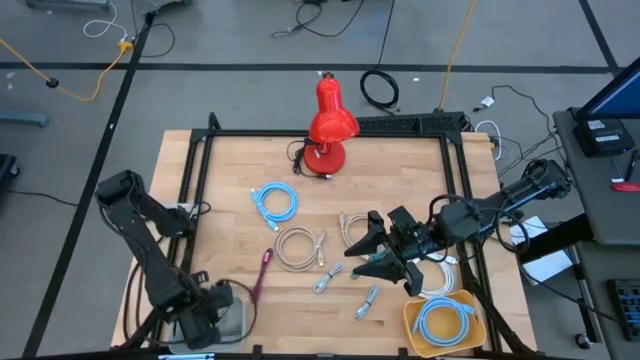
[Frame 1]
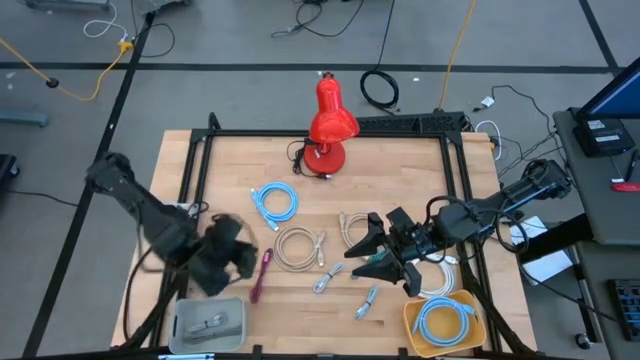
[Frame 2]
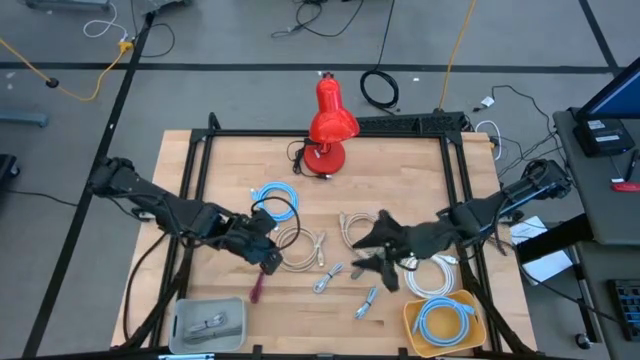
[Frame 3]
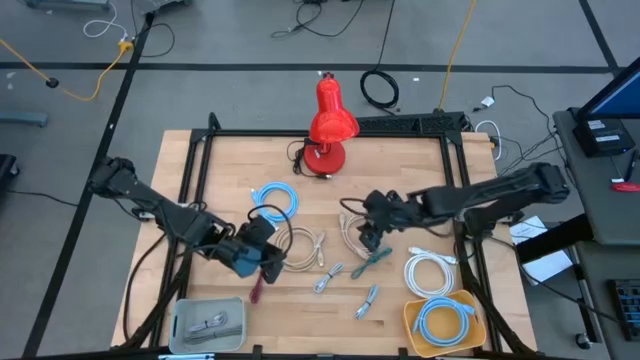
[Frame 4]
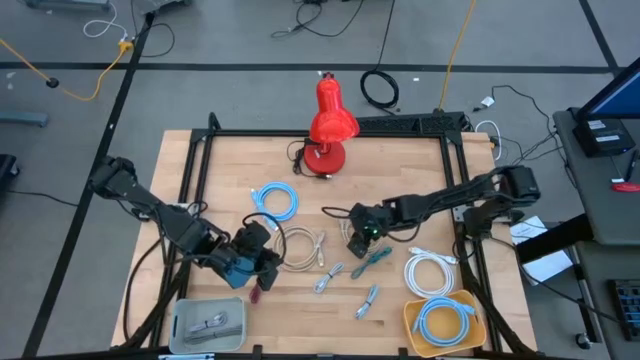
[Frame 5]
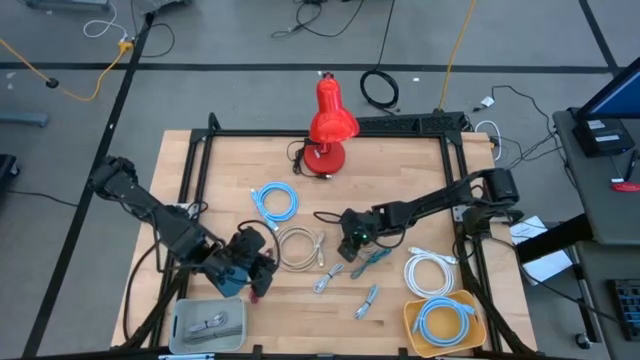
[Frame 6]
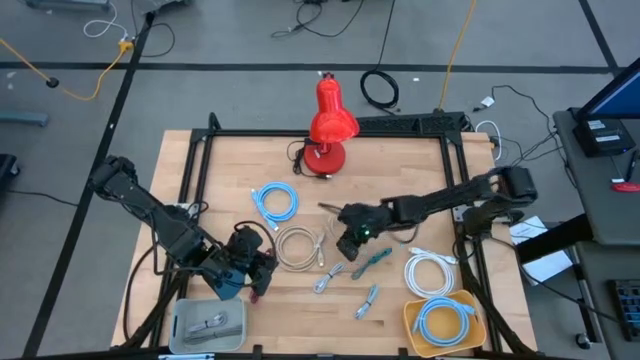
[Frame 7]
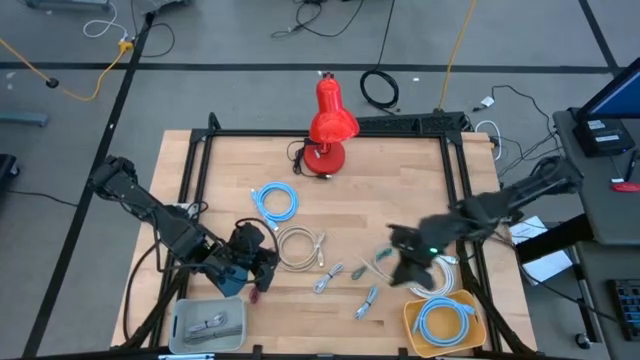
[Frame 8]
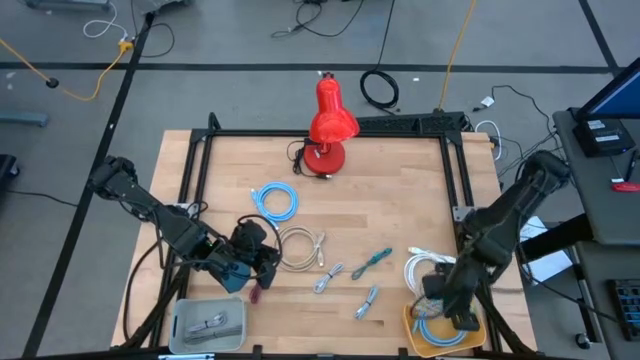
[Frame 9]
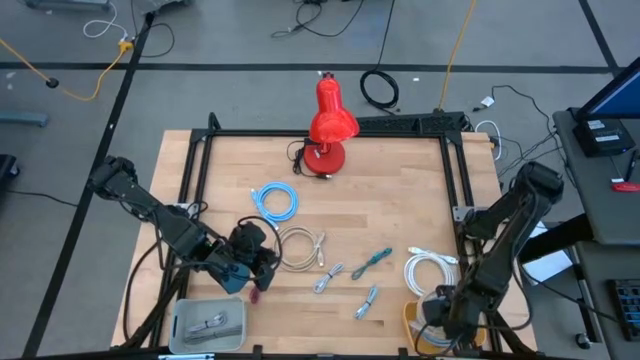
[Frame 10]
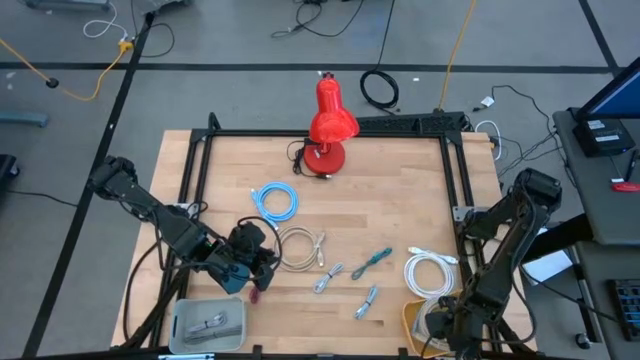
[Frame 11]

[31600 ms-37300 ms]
Task: Pick & Place USB Port
Put the right light brown HDMI cable into the yellow bin

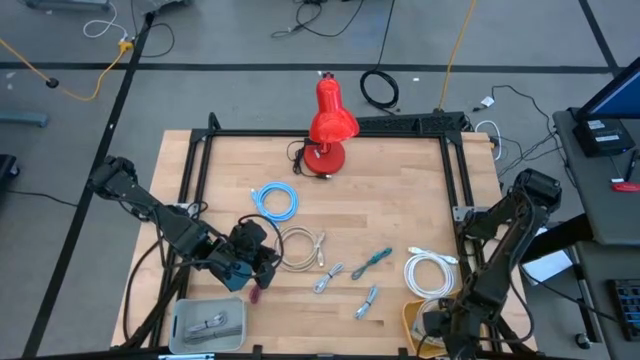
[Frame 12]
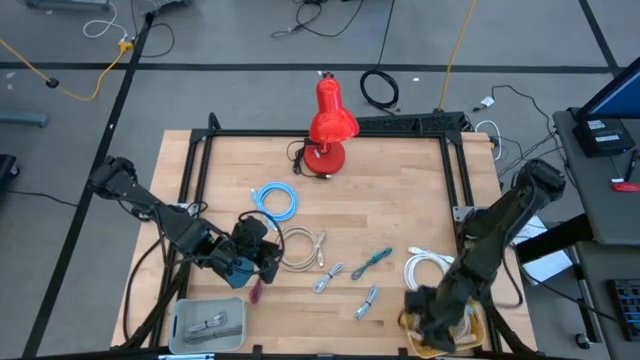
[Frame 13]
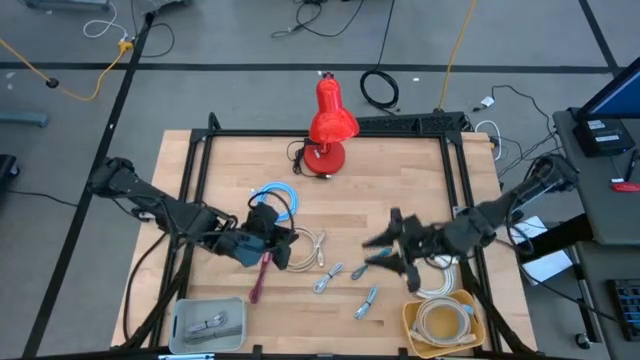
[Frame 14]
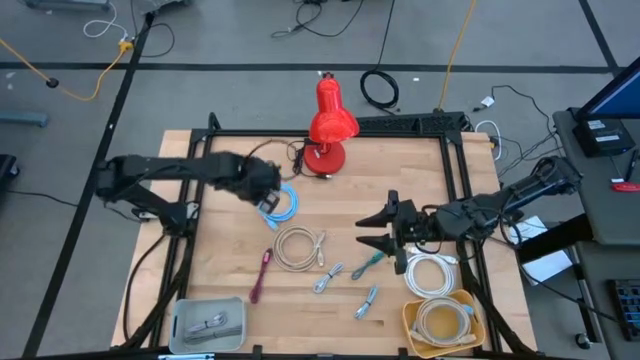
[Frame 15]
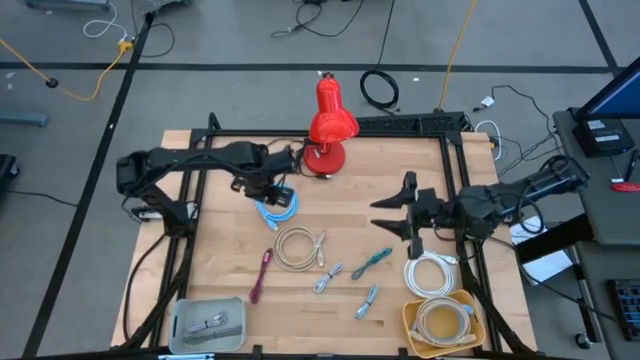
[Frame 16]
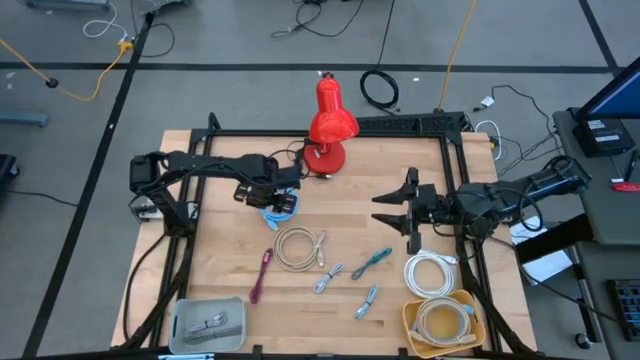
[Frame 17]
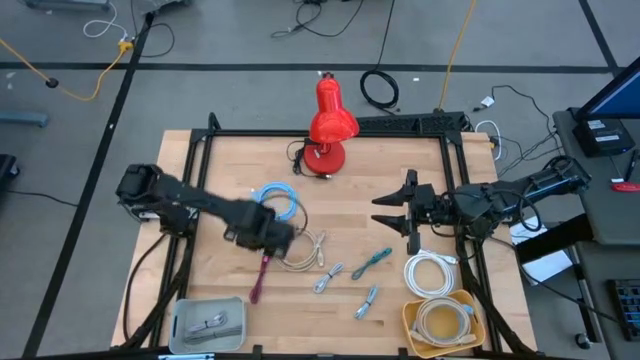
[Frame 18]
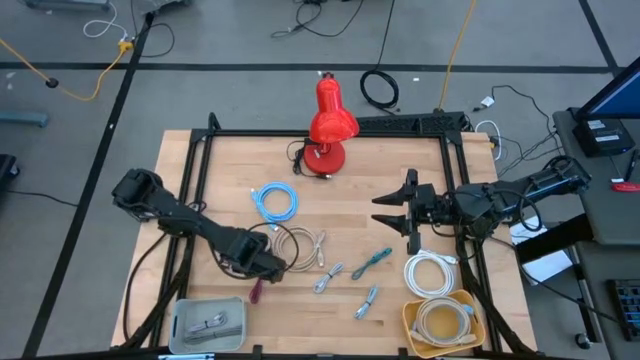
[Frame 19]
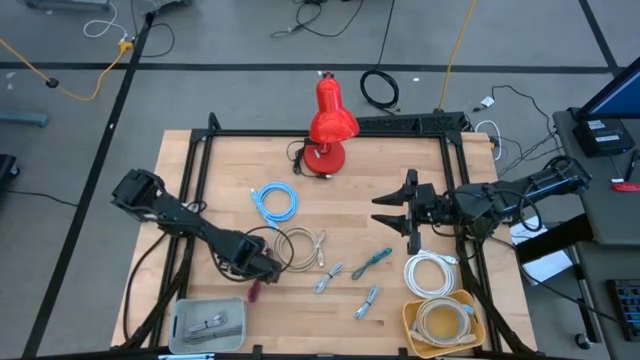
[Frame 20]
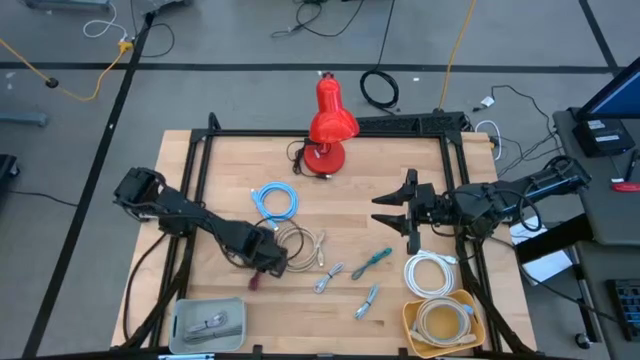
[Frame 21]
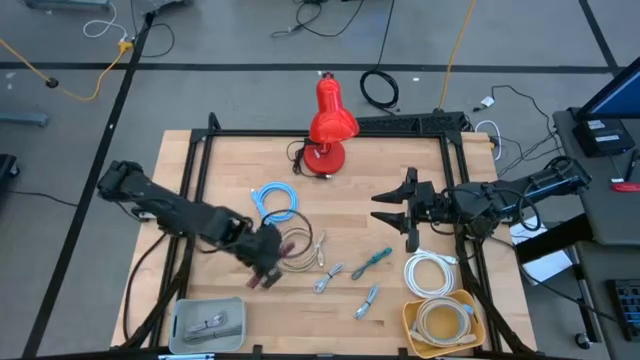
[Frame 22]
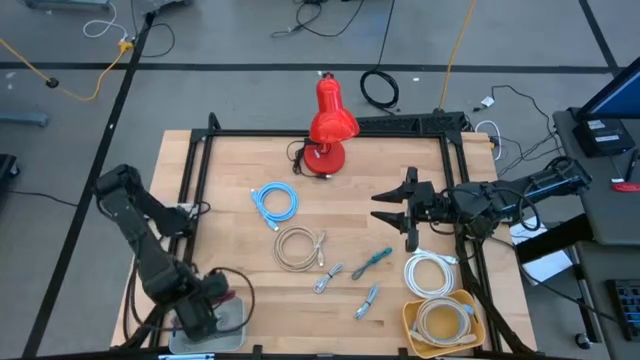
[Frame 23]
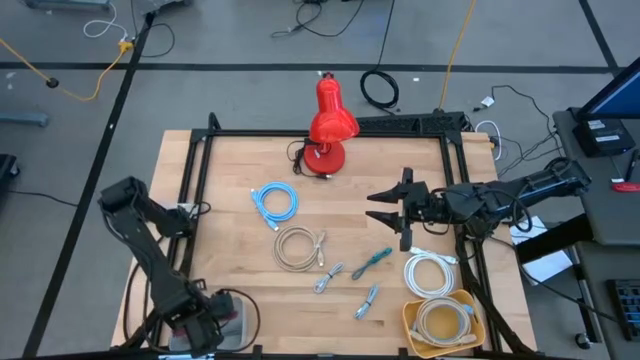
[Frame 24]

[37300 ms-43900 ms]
Put the black and pink charger cable into the white bin
